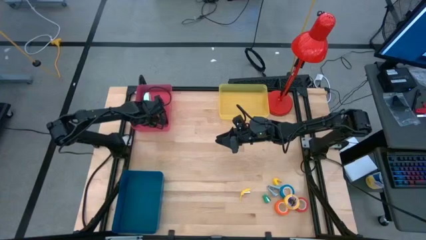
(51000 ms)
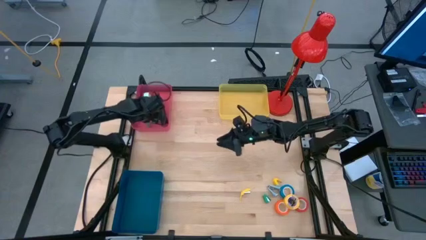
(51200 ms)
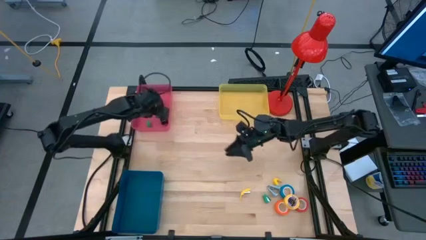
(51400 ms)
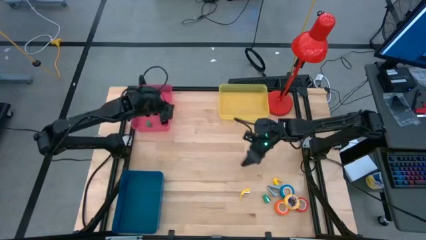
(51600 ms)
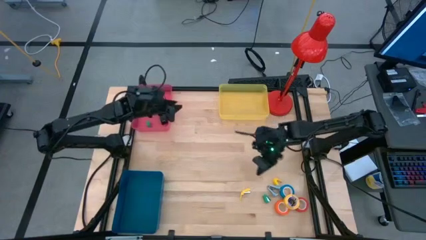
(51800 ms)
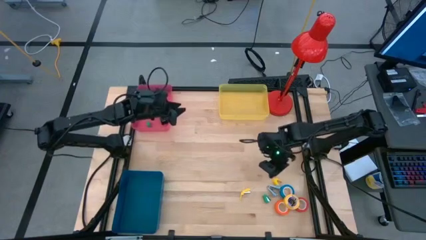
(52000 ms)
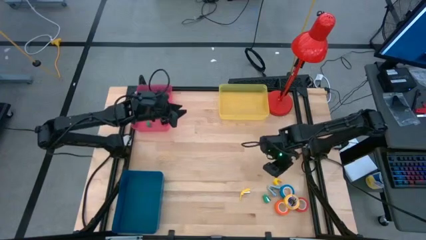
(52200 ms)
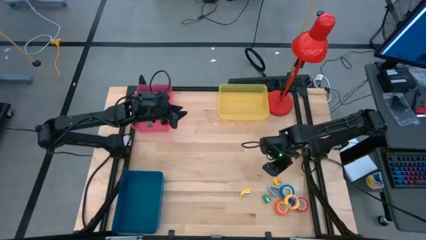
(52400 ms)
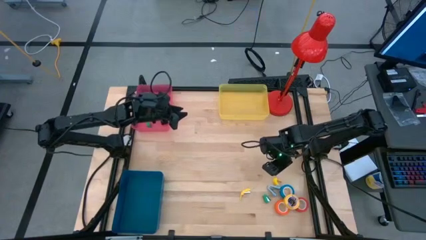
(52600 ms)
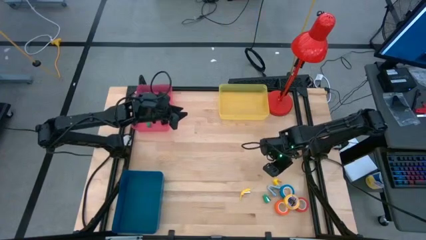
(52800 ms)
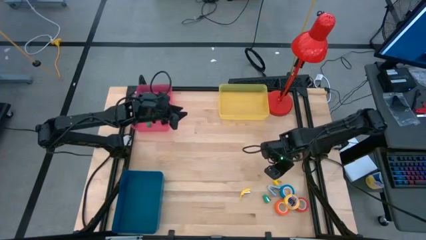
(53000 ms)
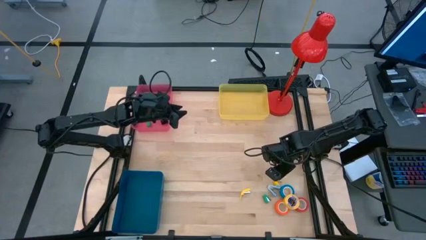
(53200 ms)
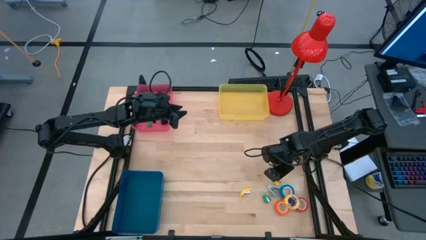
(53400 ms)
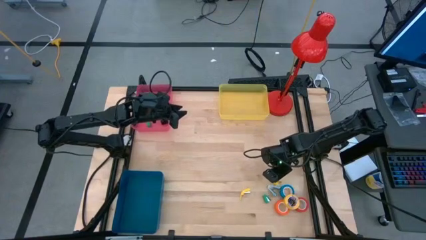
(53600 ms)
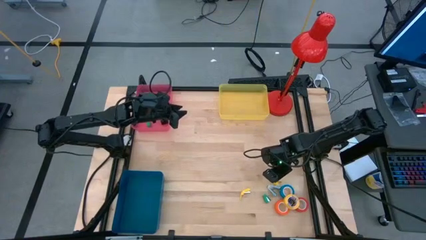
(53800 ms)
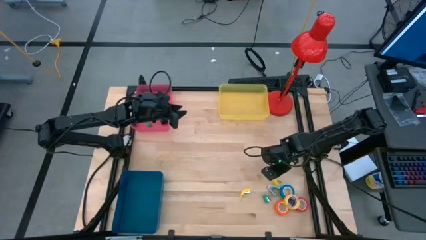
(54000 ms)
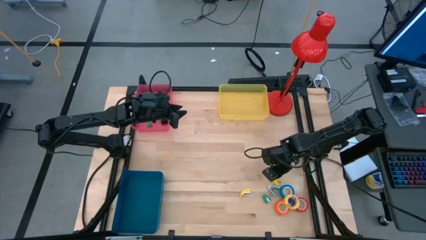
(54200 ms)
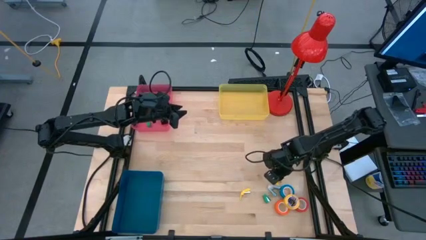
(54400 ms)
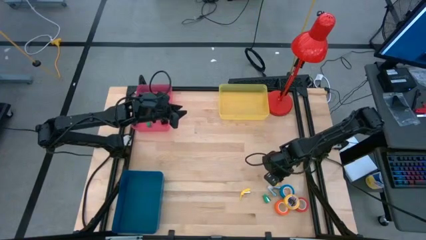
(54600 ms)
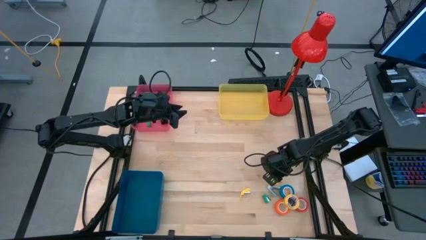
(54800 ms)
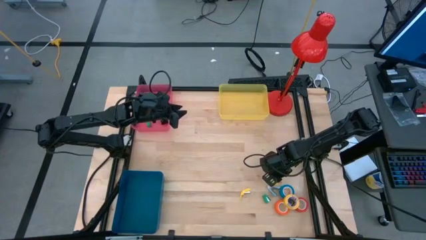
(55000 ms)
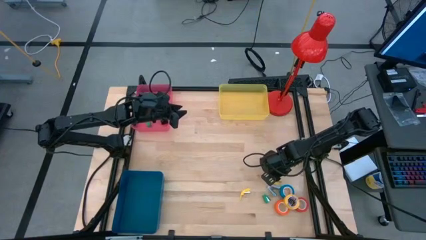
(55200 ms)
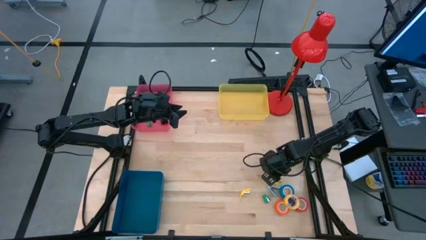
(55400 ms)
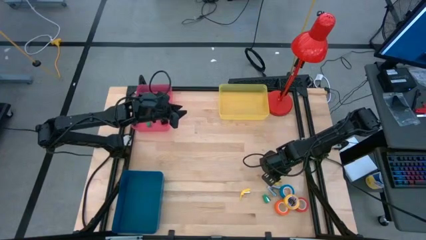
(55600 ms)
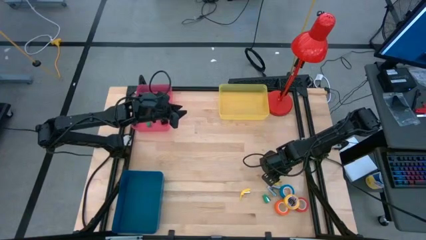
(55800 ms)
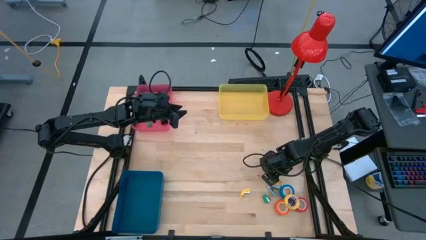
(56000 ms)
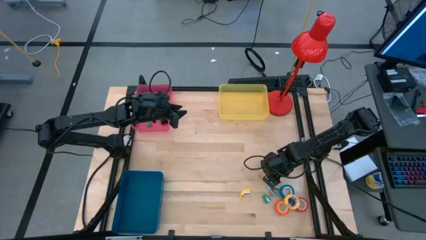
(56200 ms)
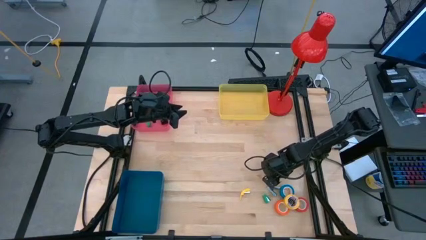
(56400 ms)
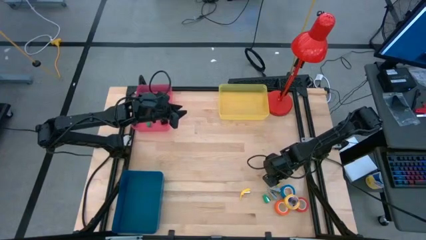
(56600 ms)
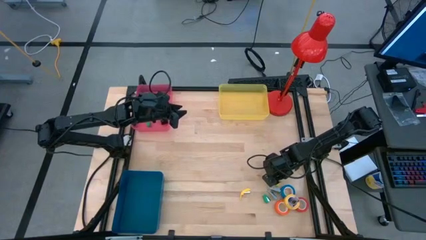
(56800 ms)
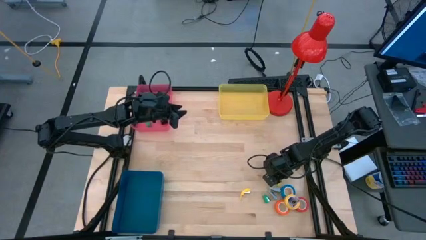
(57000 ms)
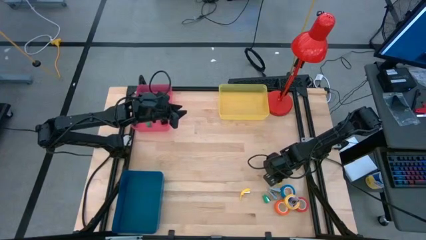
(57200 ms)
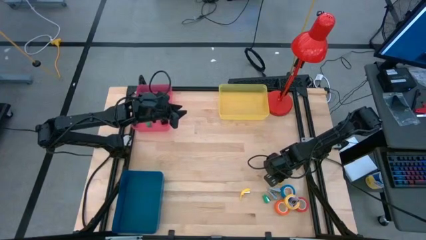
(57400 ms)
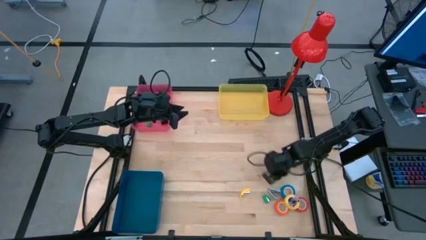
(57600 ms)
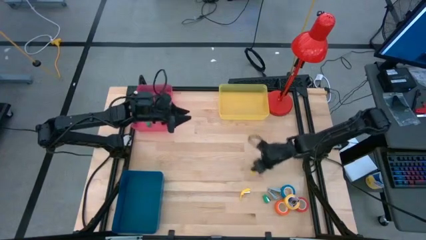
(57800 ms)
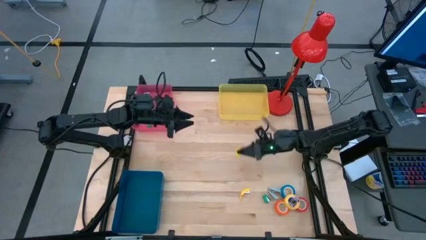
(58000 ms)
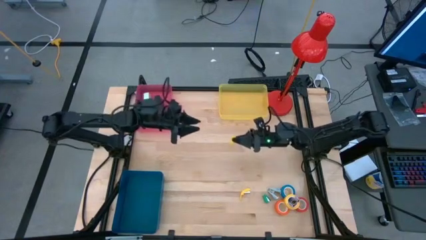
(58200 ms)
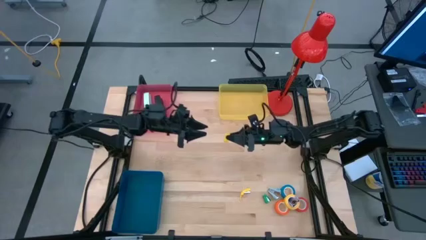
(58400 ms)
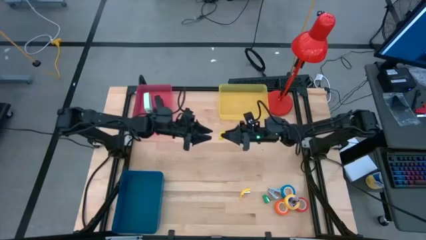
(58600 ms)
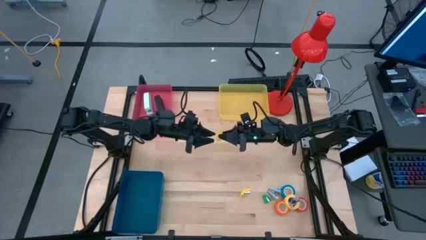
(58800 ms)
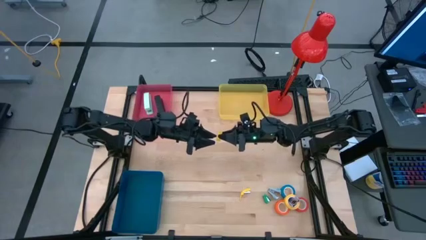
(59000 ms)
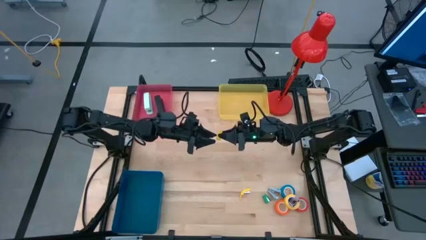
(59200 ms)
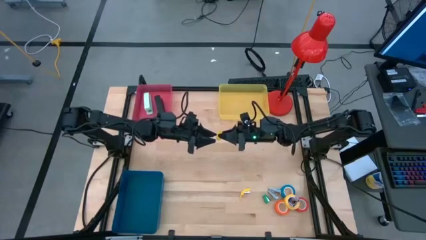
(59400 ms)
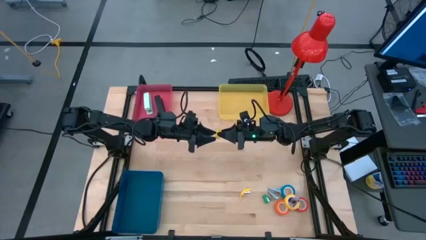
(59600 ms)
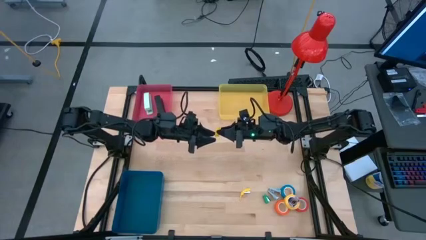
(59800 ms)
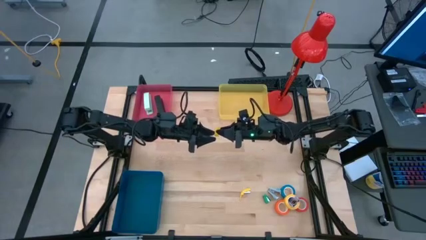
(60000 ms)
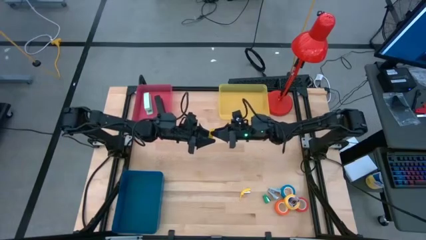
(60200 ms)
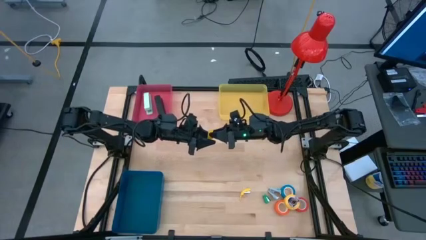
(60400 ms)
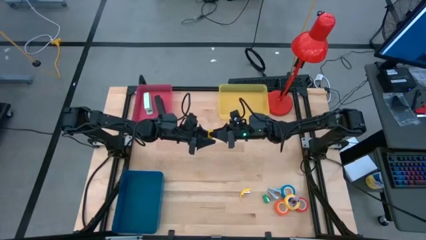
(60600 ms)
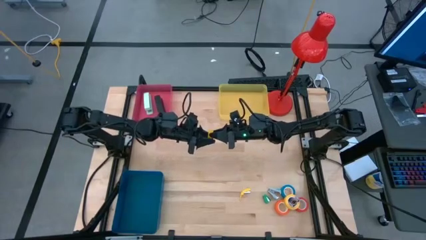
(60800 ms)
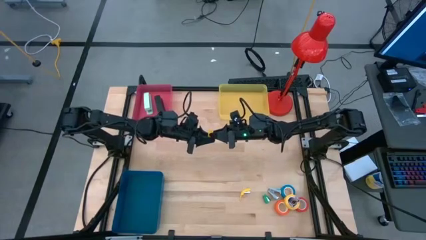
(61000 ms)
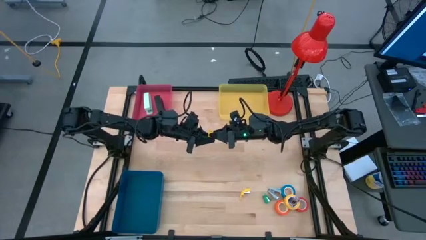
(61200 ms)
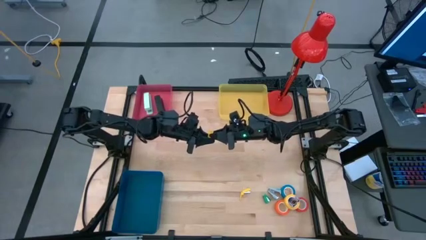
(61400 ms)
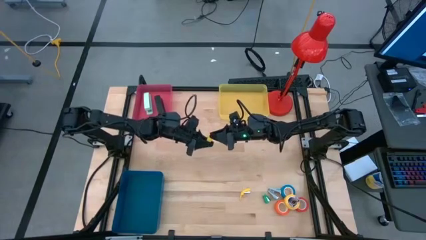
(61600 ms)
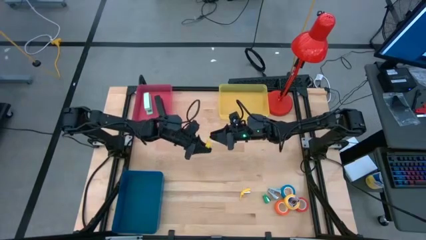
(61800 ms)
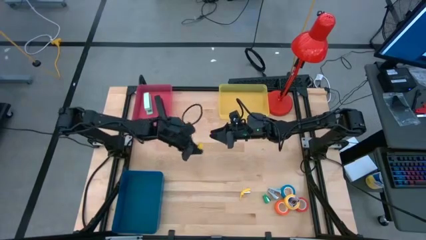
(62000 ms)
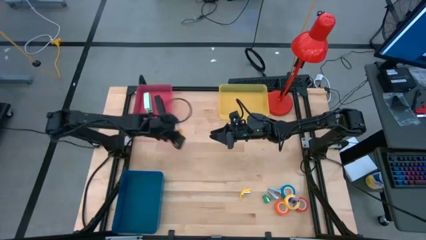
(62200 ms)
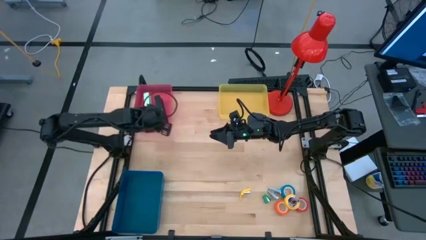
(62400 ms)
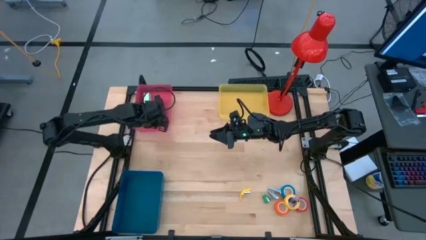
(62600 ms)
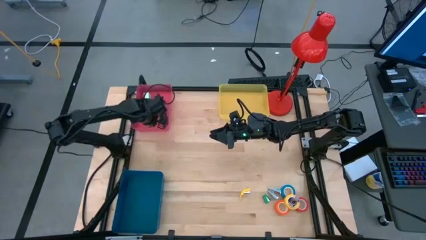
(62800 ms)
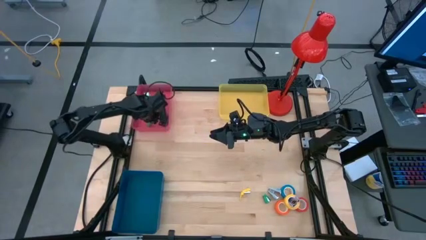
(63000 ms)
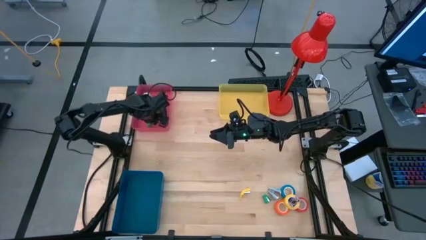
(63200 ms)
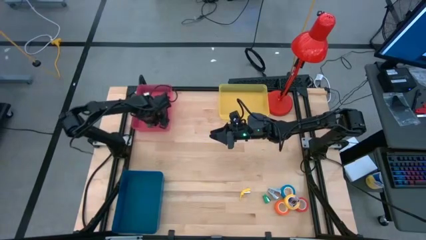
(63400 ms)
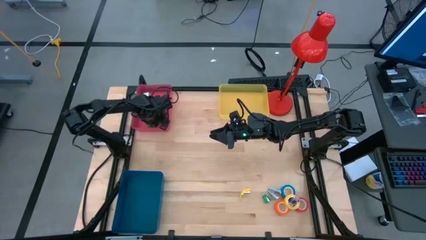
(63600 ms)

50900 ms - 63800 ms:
Task: Pick and place Stapler, Stapler remover, tape
Put the right yellow stapler into the red bin
